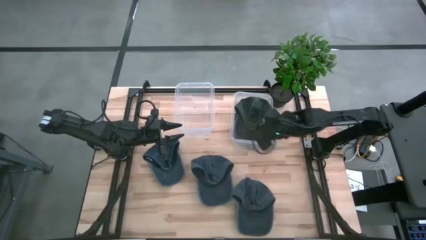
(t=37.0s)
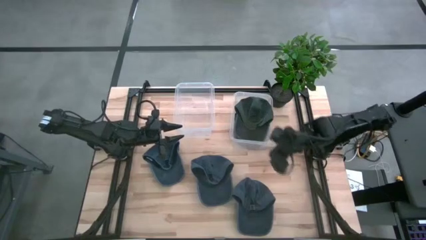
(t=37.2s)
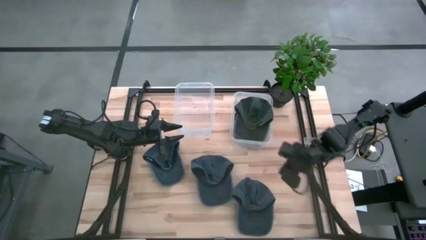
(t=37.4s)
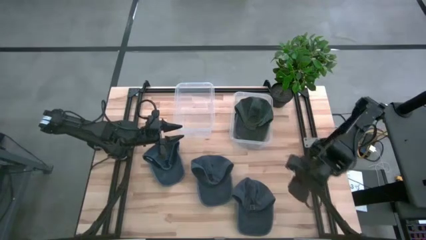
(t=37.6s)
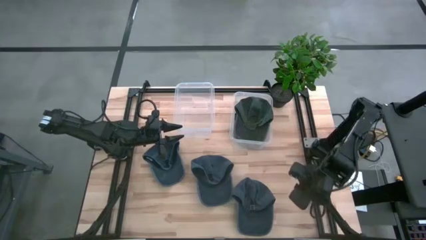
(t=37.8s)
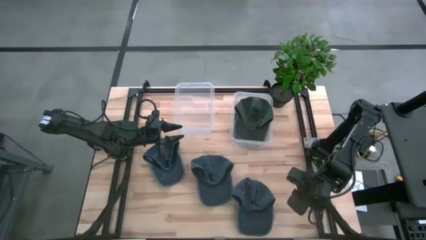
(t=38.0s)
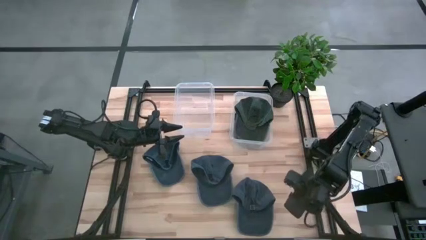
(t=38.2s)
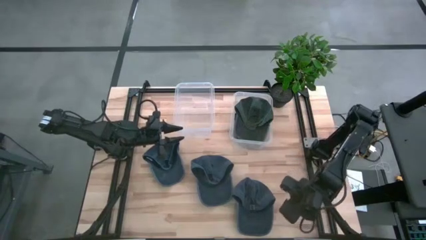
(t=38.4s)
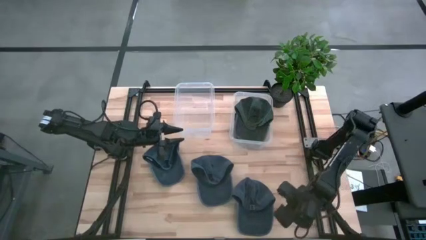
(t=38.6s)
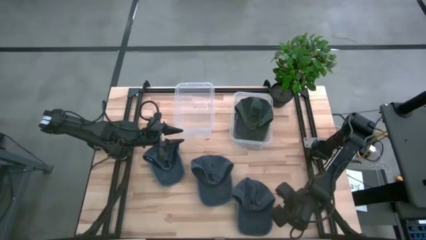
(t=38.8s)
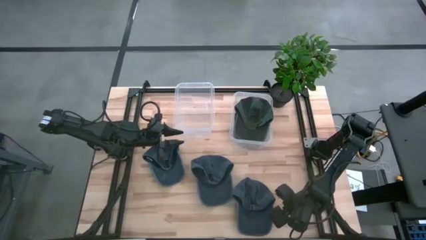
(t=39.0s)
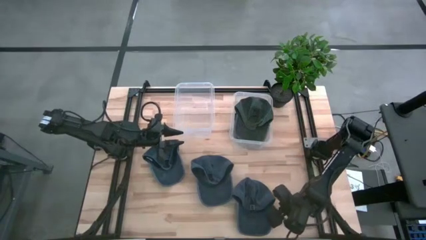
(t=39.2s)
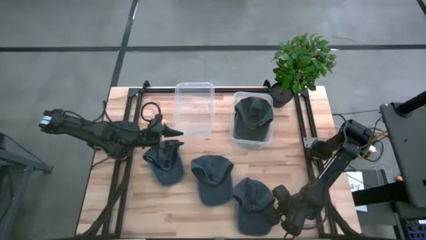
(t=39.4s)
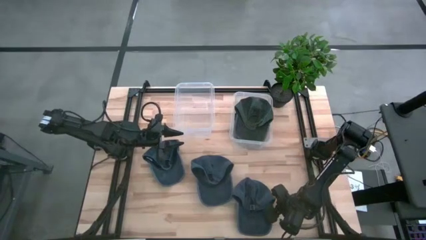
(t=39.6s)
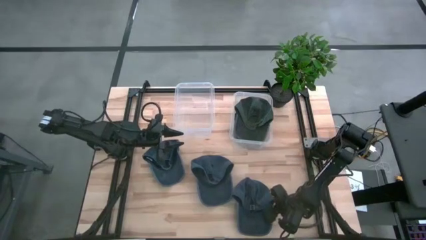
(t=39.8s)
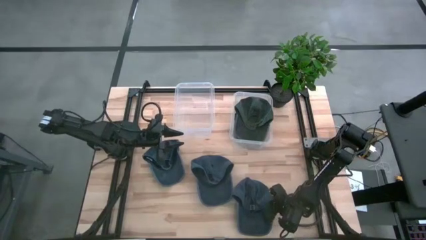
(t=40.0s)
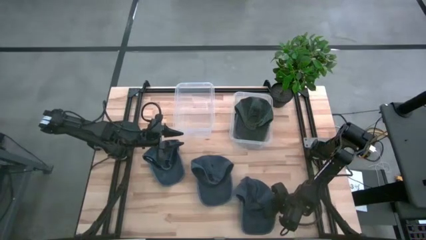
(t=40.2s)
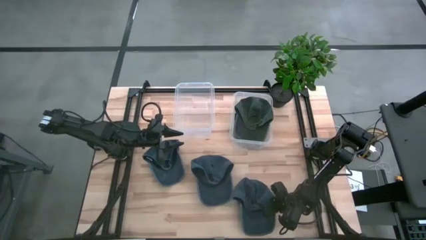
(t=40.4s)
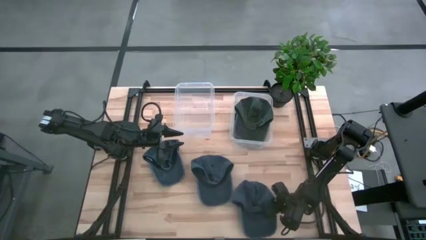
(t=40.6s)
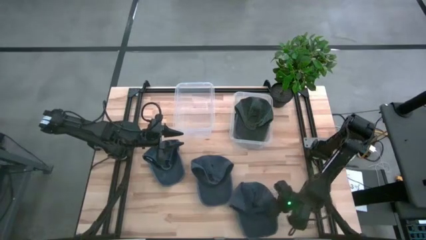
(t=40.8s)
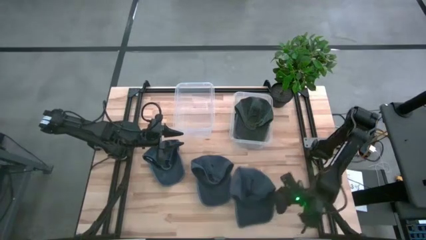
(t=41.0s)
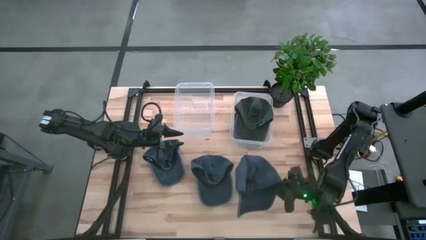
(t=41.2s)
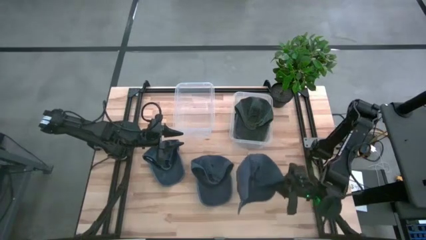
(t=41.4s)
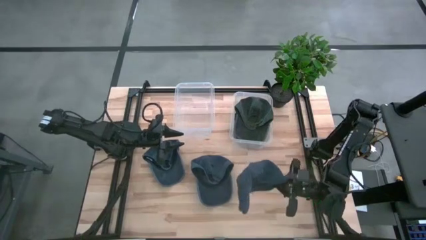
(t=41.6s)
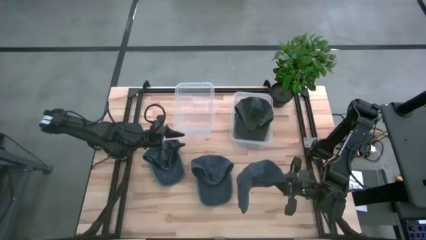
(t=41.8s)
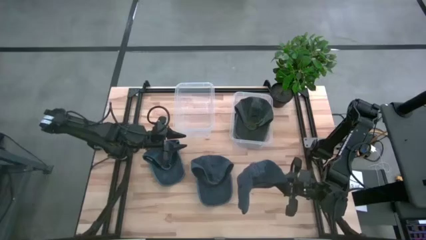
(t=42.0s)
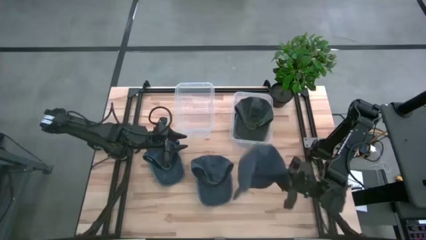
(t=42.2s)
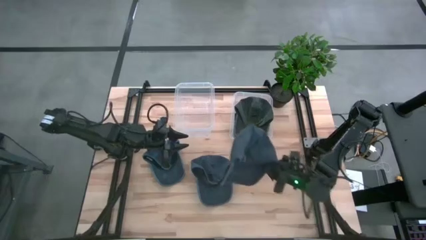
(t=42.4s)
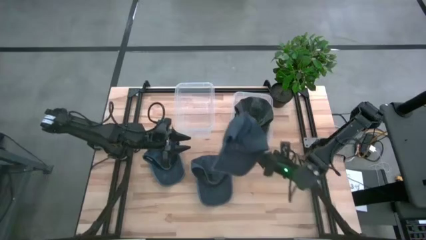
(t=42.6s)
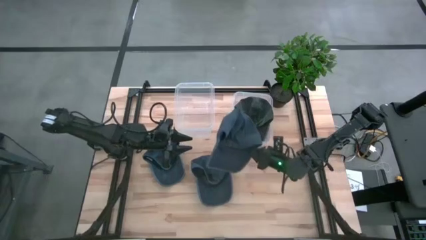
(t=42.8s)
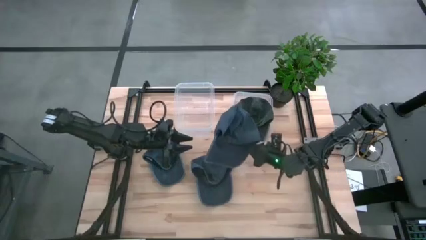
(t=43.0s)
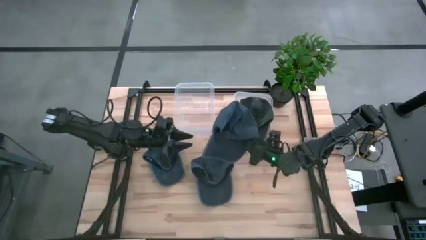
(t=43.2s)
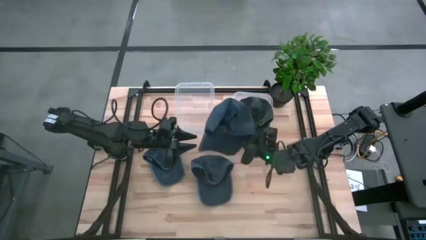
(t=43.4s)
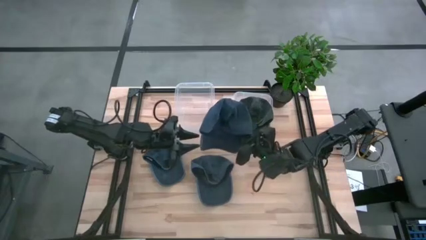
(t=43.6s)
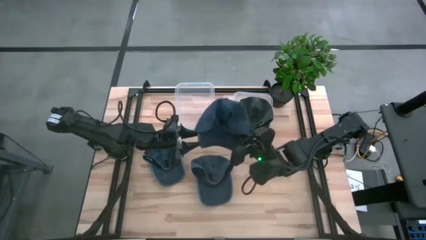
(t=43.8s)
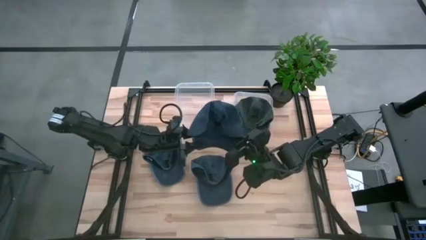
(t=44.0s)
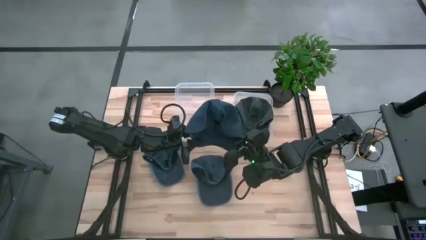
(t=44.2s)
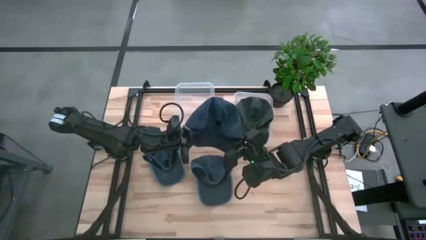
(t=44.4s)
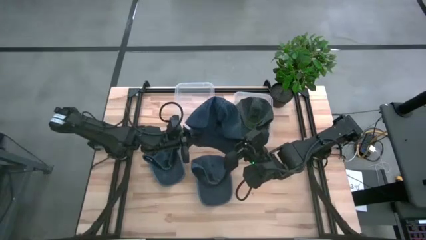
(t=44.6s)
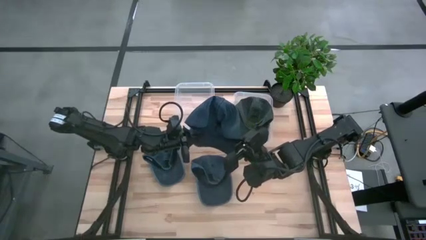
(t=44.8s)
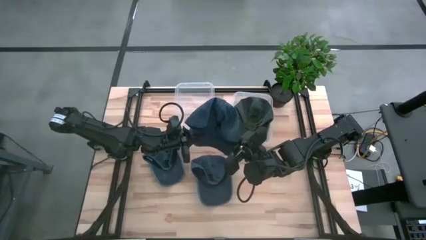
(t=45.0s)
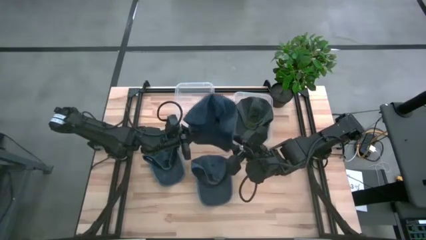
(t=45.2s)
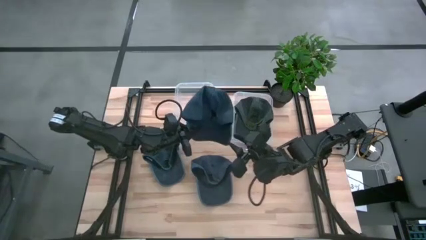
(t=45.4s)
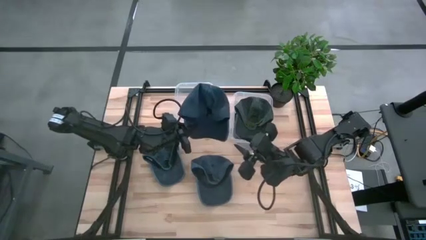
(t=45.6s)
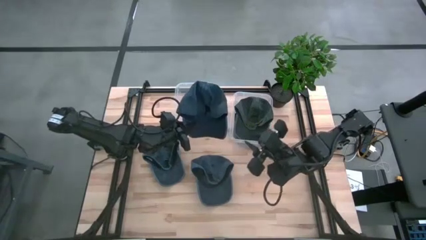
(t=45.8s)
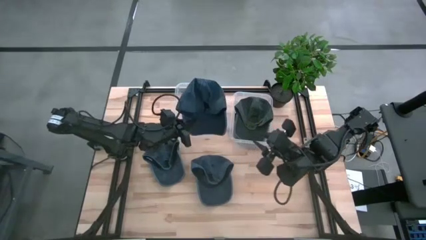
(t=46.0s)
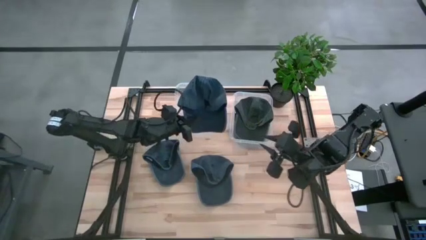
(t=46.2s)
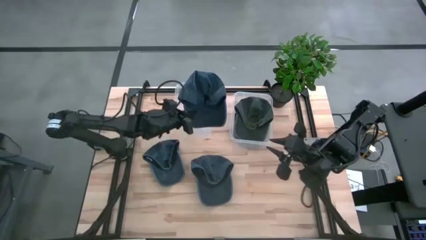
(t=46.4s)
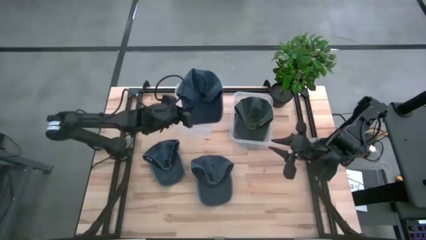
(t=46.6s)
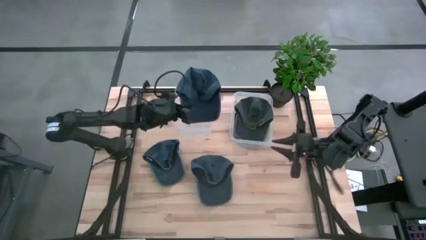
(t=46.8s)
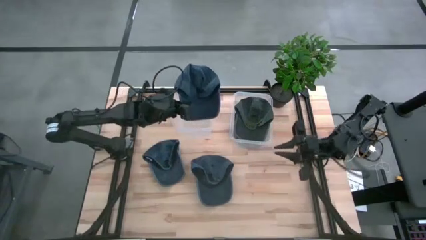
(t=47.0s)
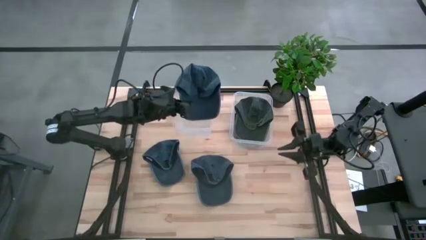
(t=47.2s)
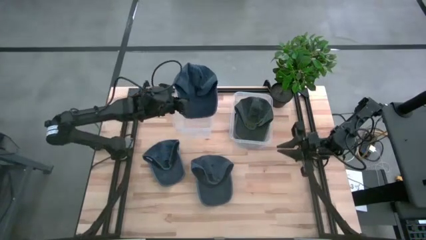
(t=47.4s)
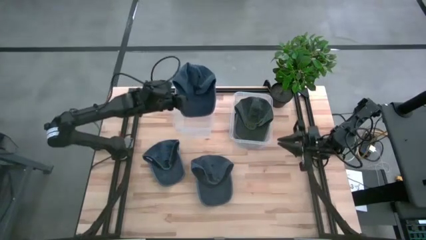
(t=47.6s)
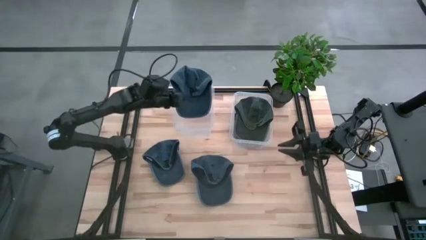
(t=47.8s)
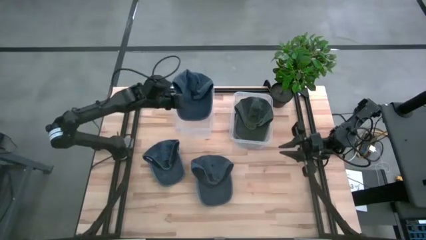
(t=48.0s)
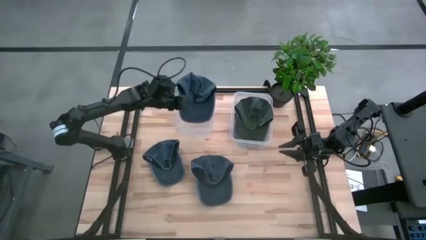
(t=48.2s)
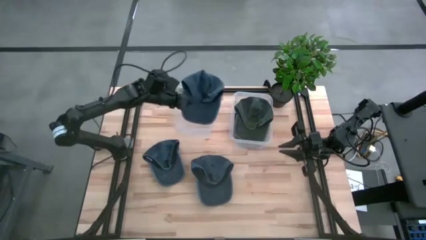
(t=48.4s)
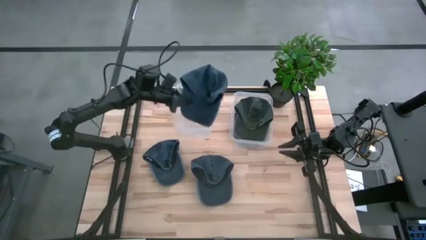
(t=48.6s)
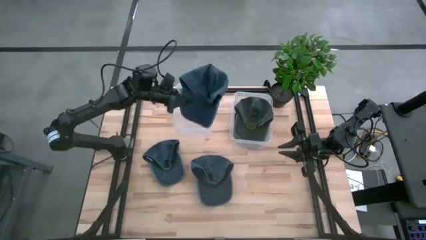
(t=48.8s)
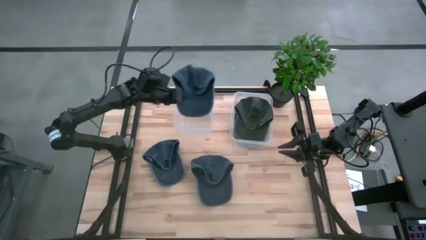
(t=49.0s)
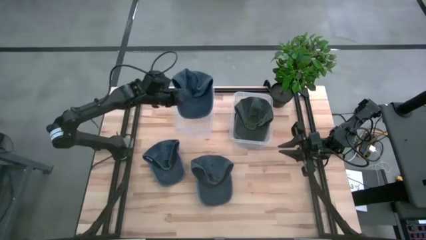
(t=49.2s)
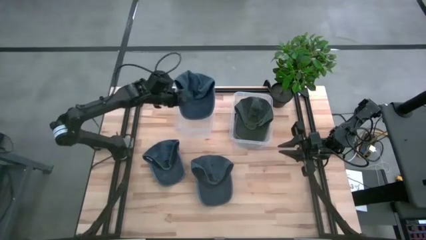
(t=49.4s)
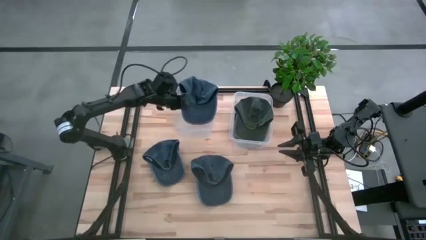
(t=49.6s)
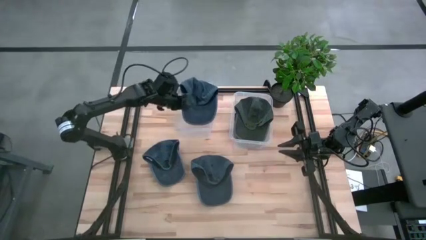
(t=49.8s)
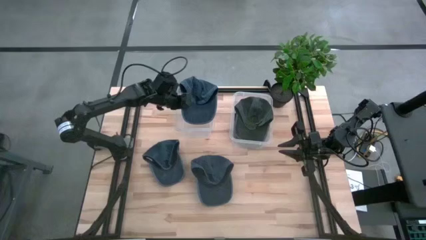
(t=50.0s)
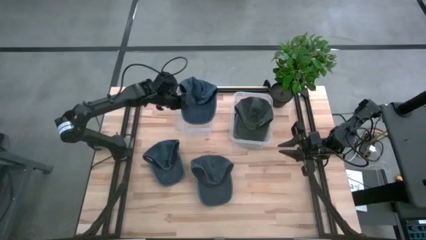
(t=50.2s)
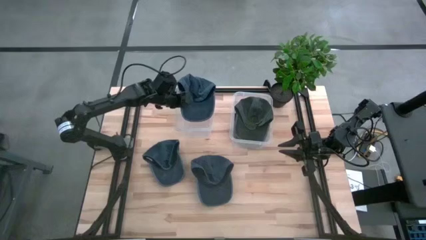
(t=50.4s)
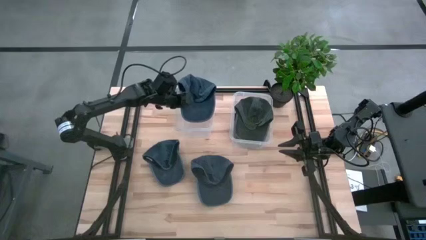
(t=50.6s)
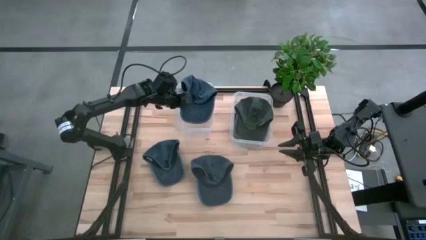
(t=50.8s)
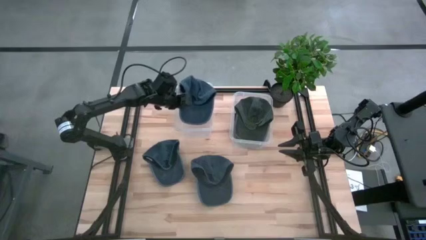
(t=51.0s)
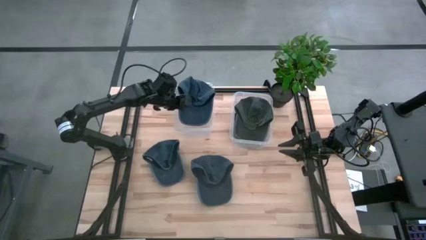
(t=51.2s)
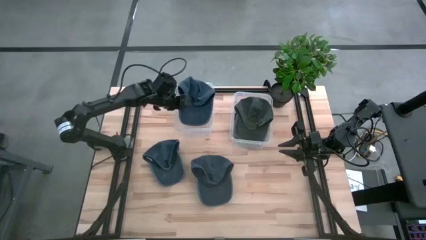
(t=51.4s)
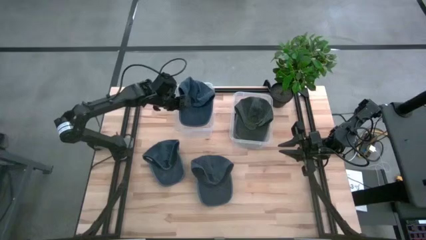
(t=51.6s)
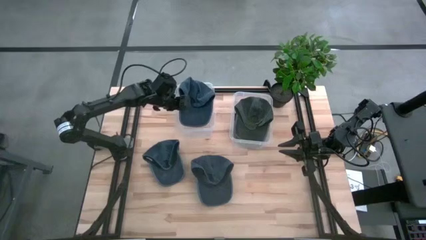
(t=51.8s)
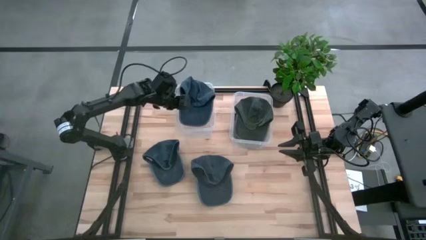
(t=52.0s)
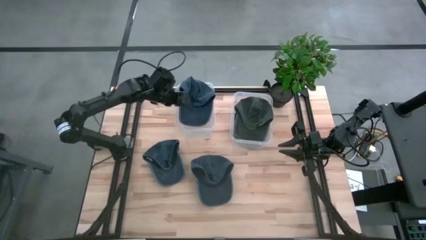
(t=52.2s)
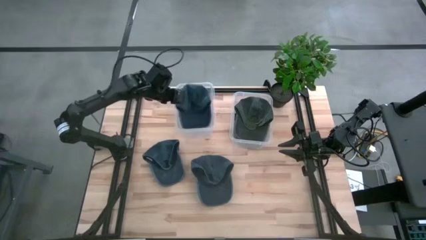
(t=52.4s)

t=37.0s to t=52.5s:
Task: Pick & Place hat
Put the bottom gray cap into the left transparent bin
